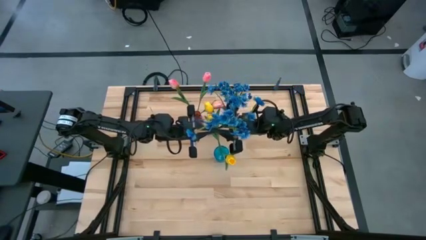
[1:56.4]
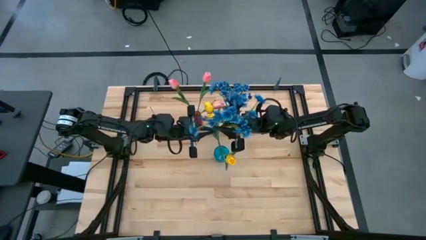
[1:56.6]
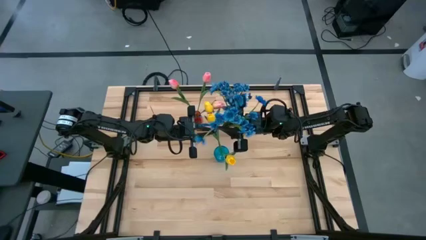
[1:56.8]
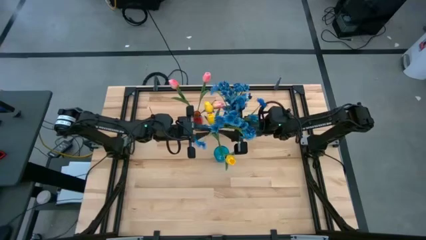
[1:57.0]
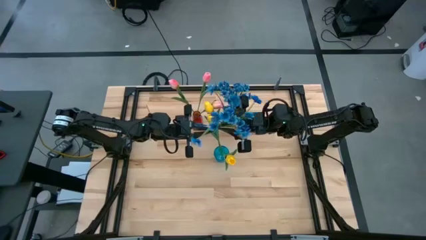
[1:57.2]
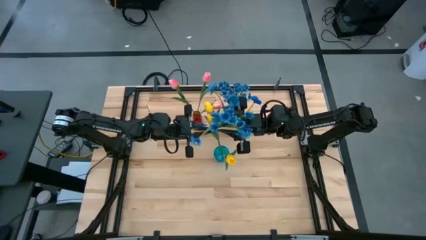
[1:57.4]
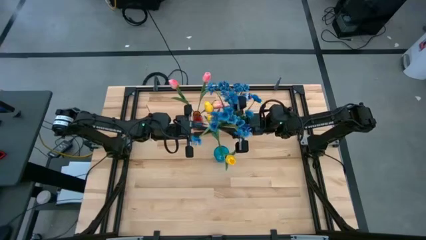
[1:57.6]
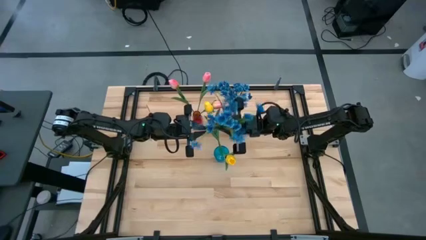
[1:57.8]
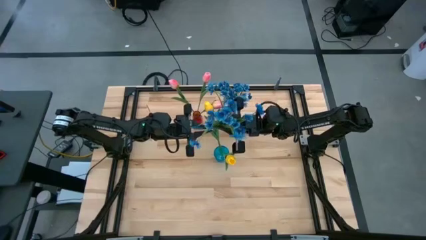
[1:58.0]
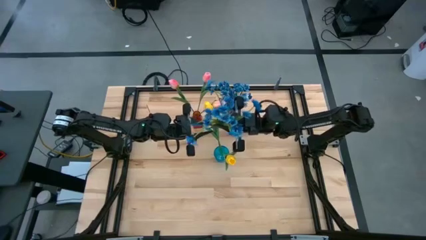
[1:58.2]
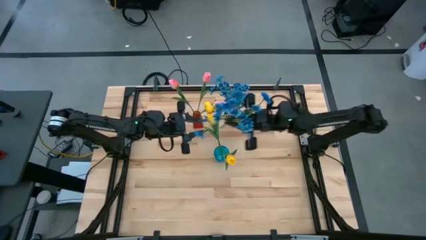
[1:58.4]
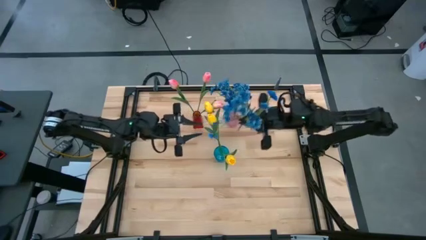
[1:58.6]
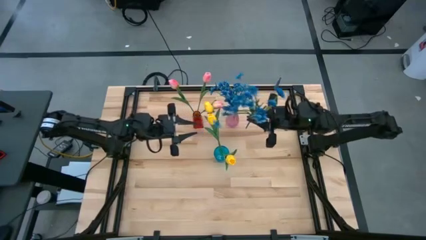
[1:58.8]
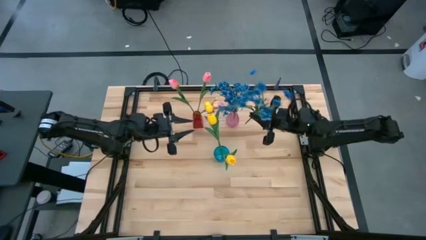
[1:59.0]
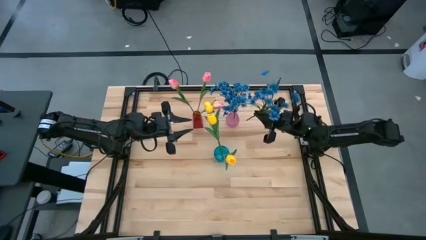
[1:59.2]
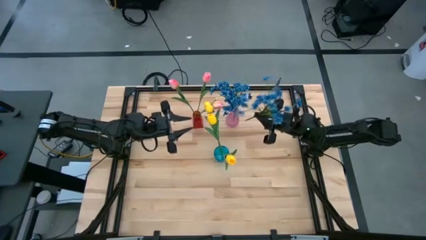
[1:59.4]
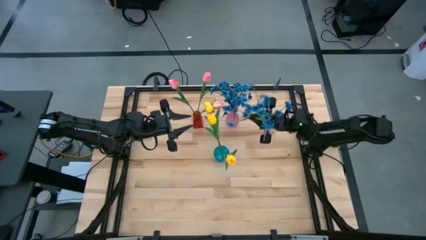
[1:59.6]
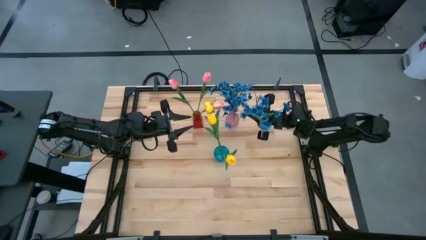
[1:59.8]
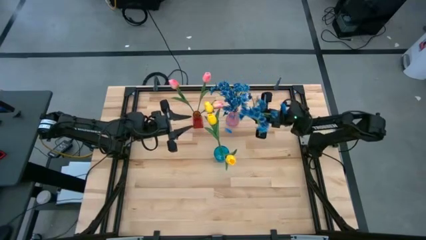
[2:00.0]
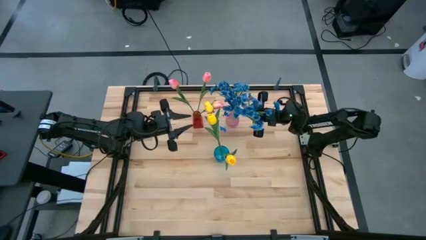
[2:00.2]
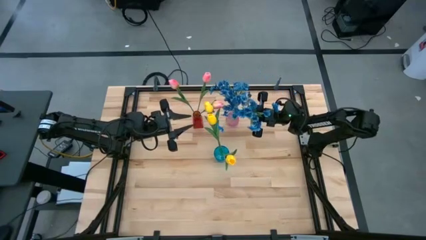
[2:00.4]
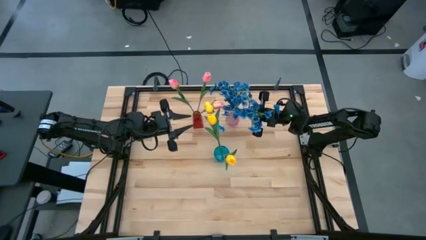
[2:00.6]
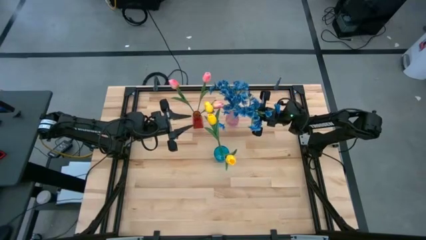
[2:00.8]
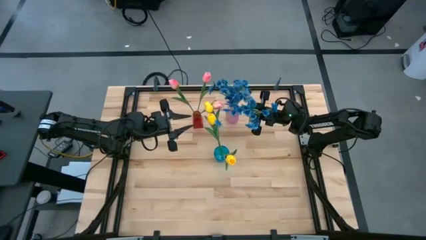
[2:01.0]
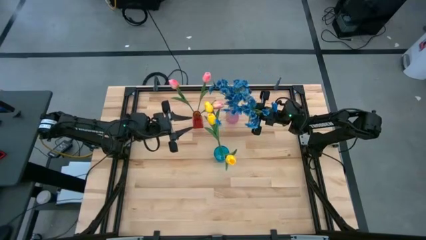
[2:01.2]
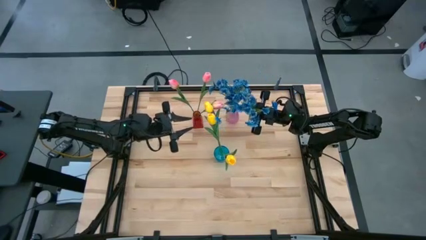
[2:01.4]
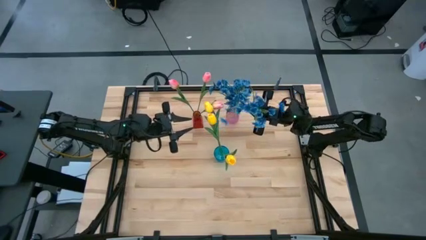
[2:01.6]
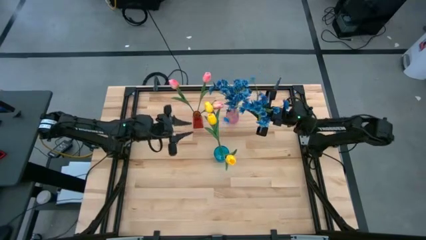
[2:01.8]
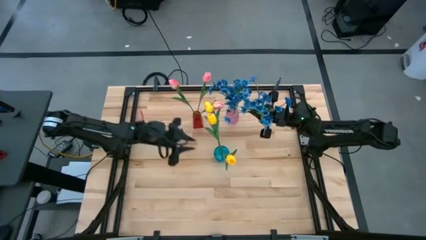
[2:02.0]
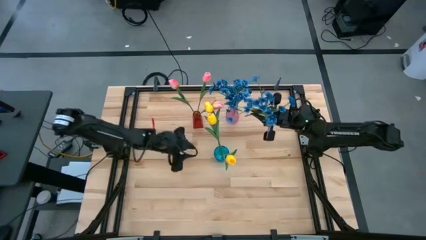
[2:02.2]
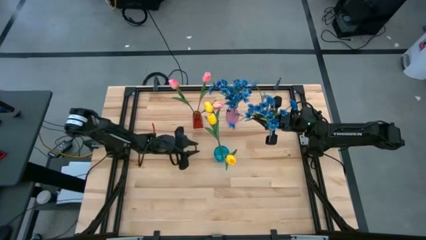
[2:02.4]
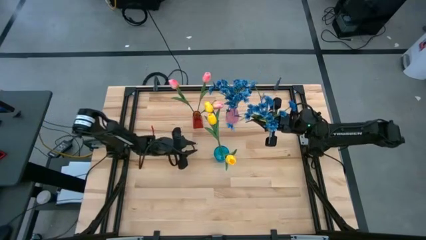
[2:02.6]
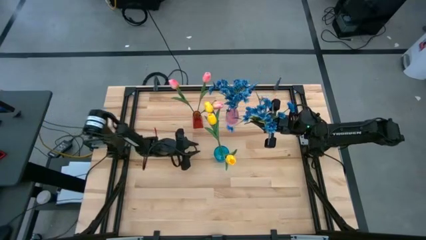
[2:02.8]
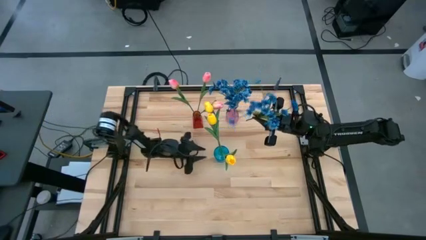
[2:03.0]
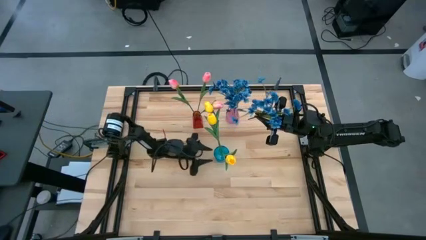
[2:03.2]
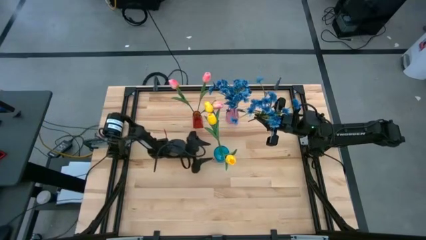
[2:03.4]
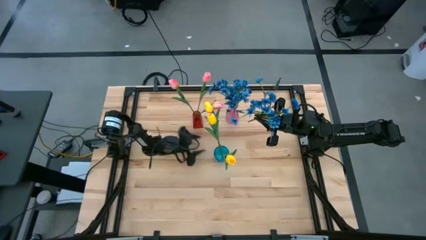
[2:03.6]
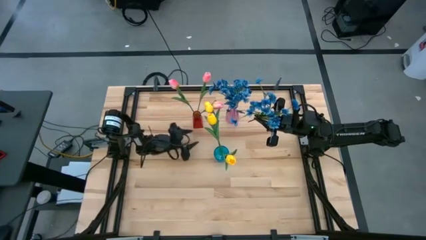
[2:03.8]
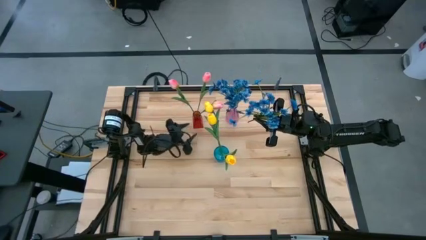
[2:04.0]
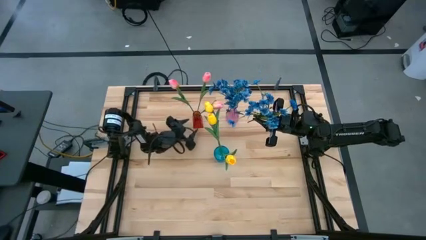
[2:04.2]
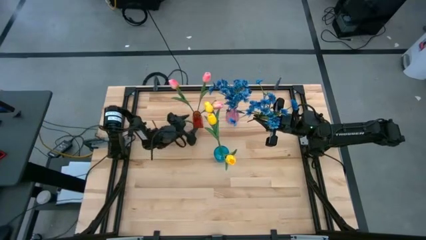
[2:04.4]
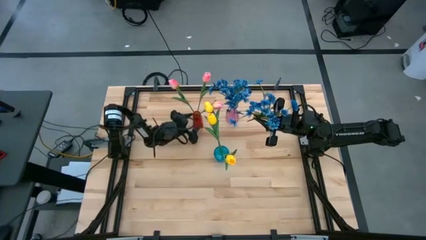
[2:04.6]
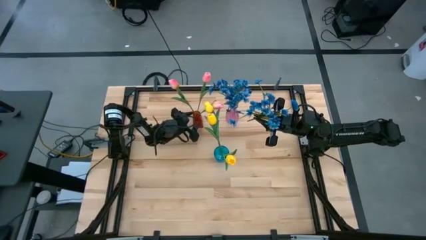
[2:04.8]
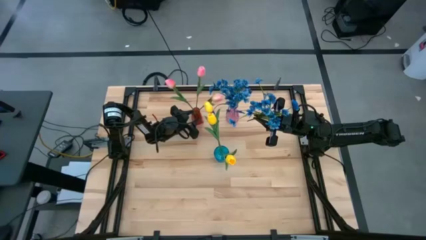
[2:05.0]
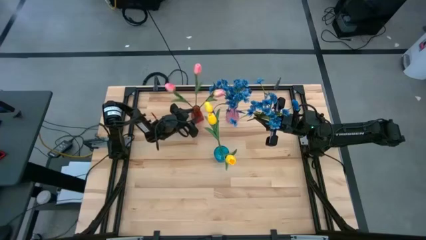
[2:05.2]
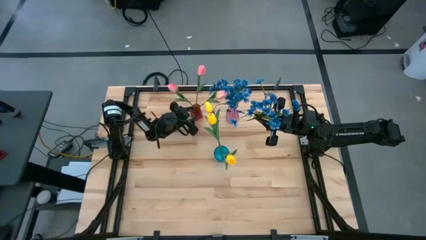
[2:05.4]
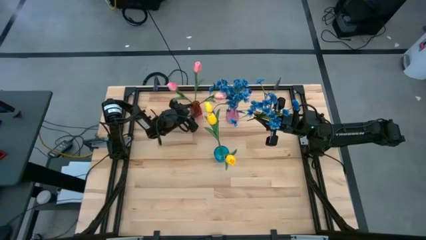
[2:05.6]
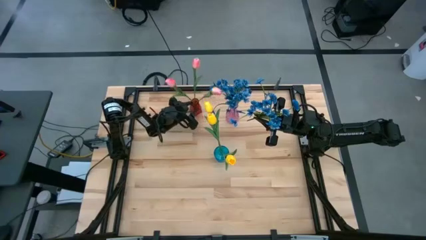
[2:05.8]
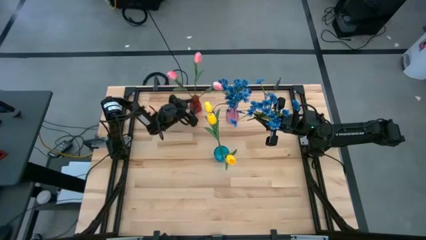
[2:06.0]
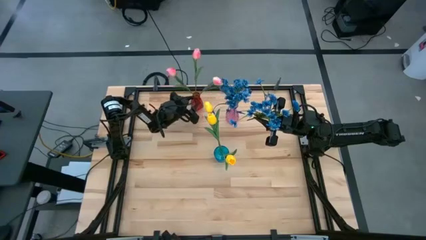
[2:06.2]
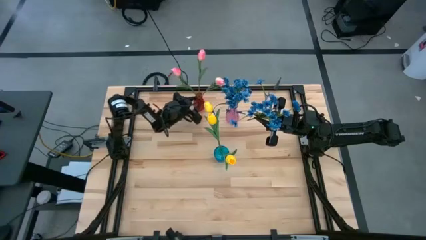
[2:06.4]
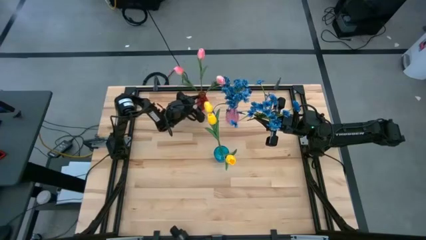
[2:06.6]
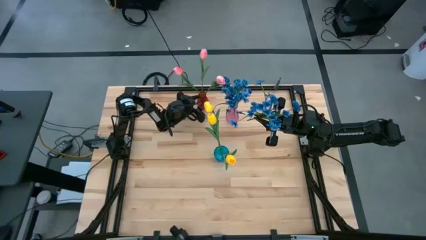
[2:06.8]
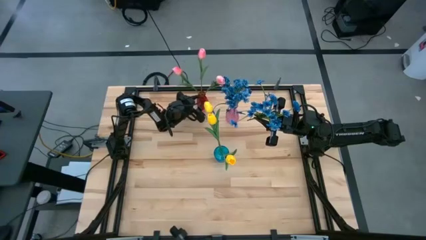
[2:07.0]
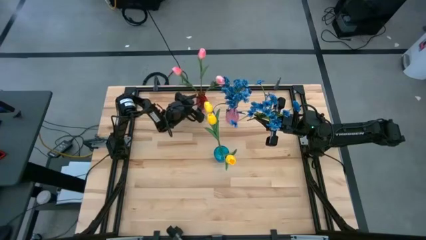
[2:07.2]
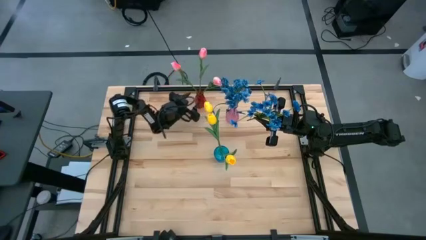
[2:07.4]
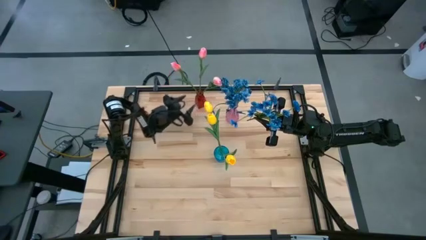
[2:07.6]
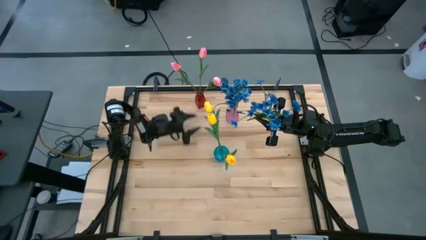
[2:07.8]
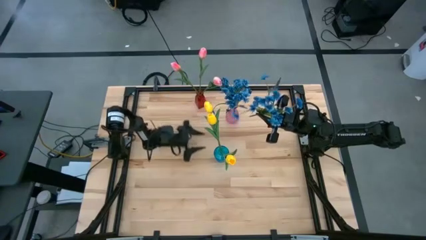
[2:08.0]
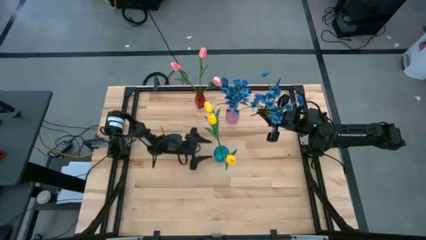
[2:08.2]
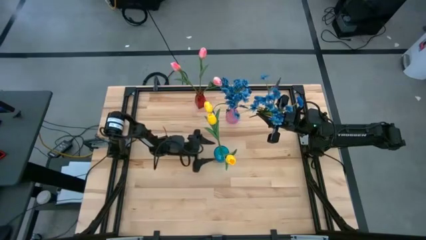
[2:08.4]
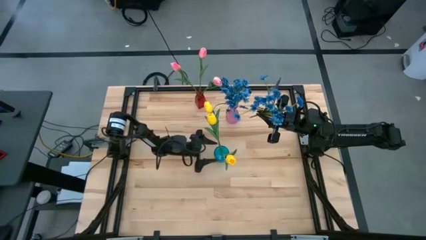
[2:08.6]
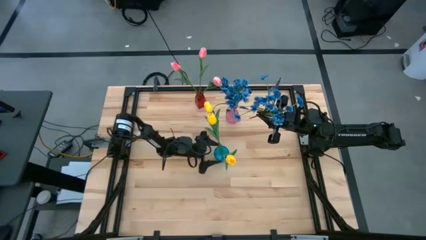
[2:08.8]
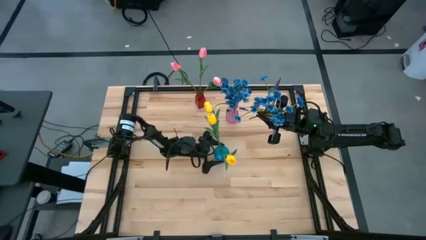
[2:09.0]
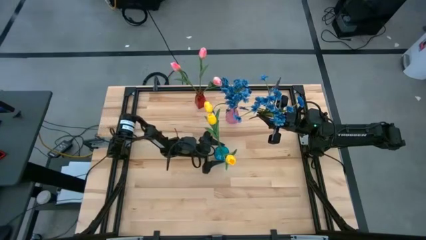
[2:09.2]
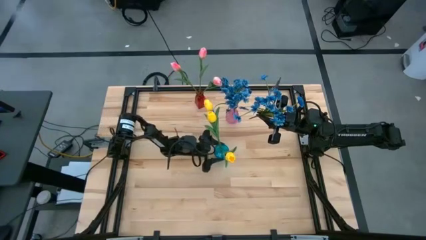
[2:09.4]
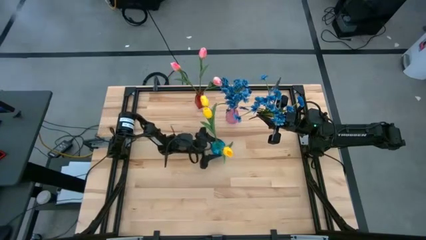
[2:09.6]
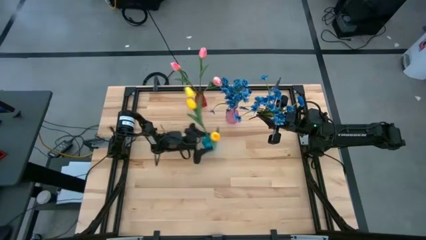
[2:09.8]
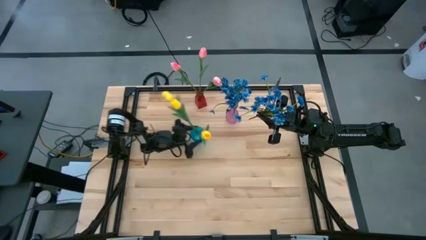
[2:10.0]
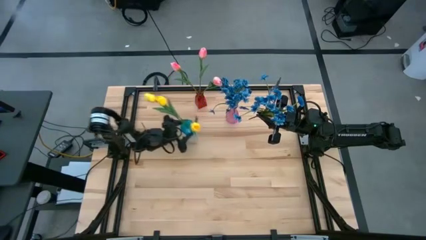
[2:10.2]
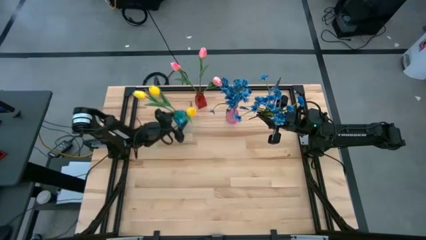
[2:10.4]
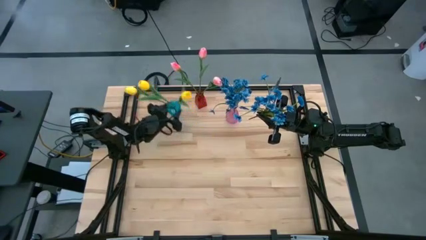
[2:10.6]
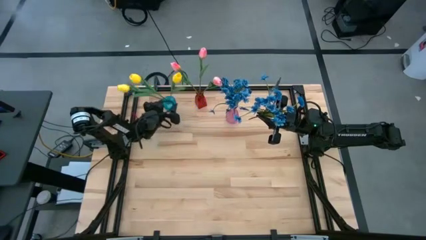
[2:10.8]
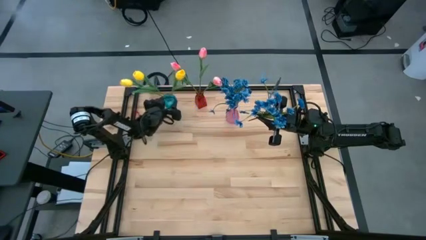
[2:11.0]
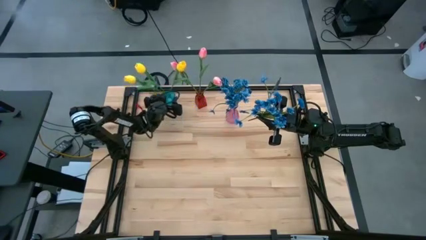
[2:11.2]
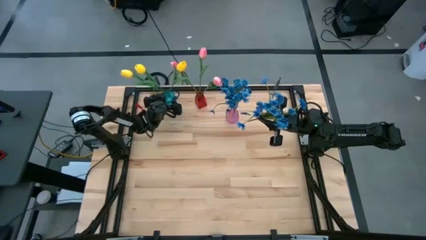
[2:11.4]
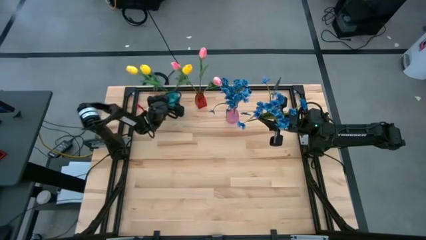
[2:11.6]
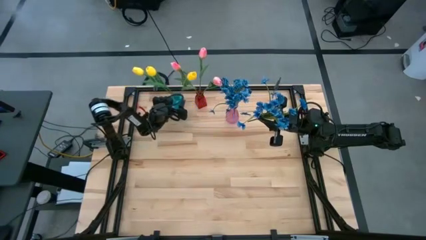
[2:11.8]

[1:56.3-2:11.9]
Task: Sort flowers into vase by color
Put the blue flowers into the pink vase
